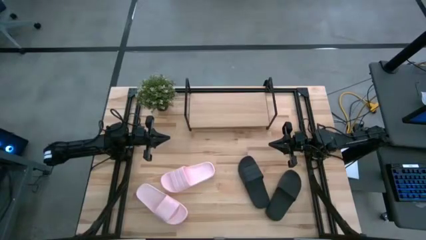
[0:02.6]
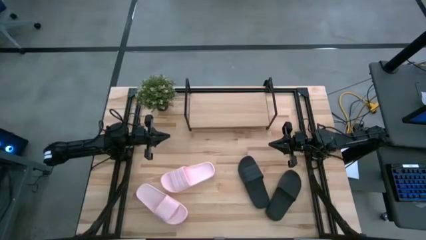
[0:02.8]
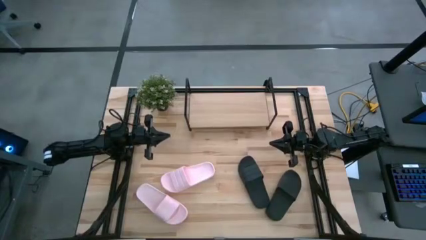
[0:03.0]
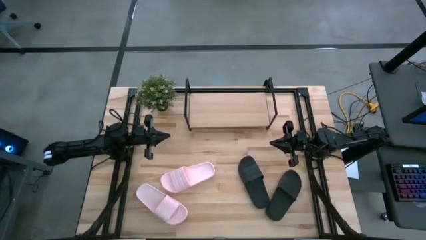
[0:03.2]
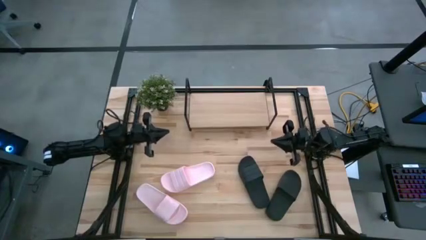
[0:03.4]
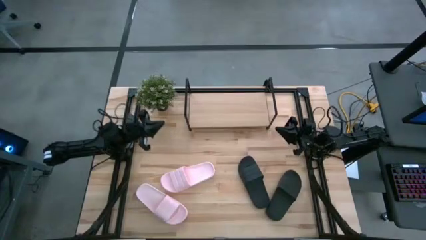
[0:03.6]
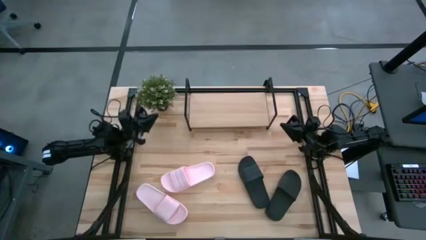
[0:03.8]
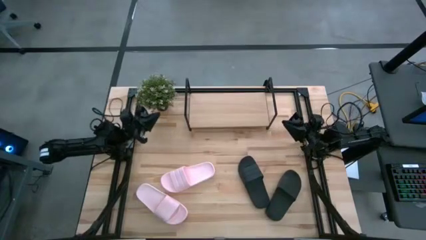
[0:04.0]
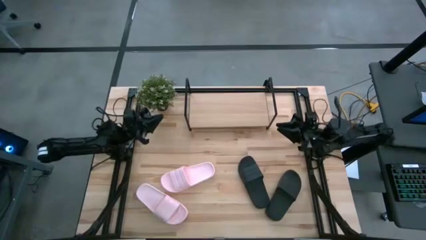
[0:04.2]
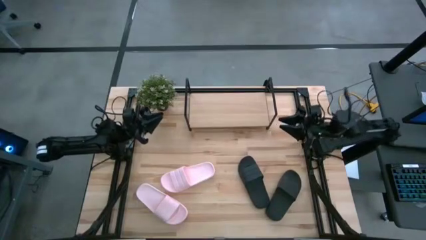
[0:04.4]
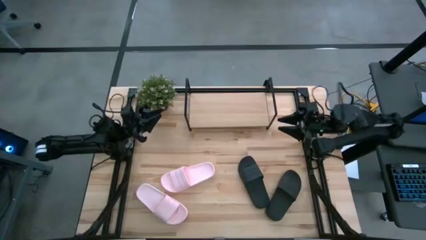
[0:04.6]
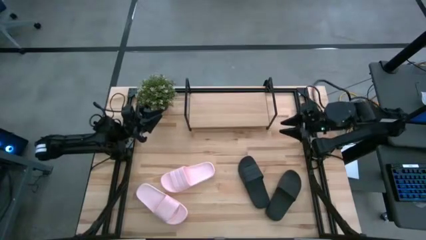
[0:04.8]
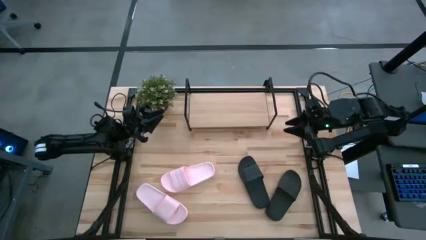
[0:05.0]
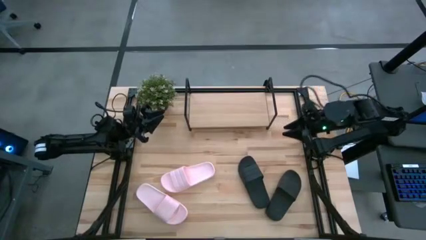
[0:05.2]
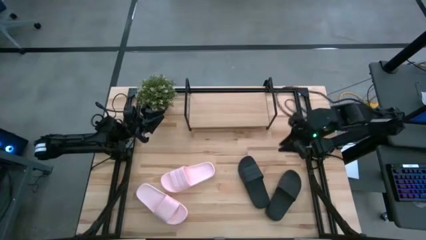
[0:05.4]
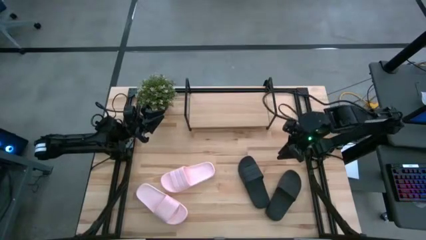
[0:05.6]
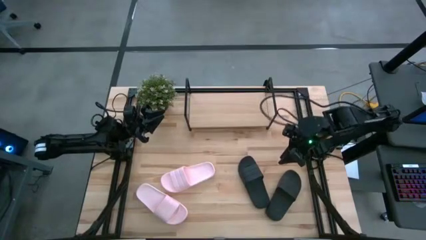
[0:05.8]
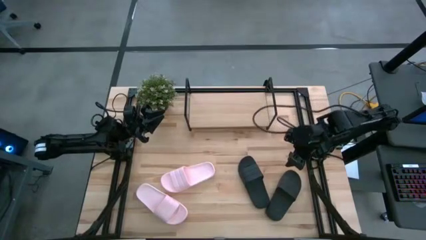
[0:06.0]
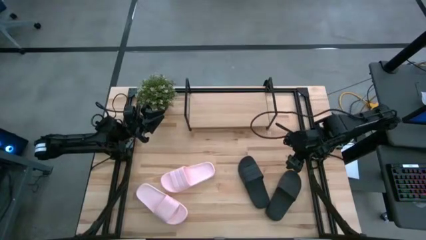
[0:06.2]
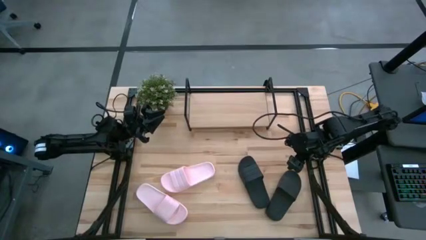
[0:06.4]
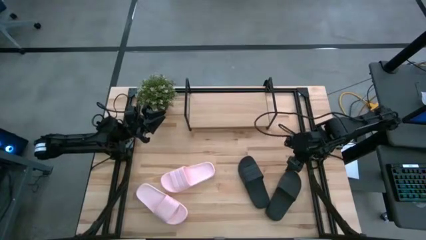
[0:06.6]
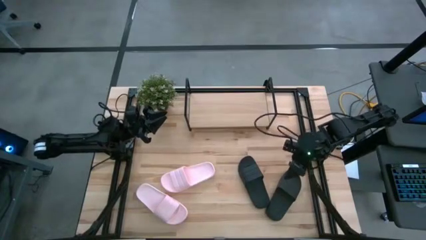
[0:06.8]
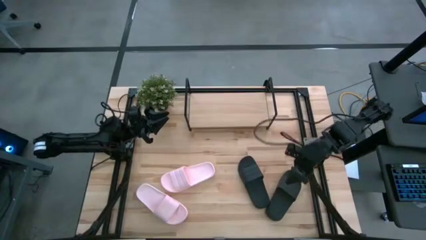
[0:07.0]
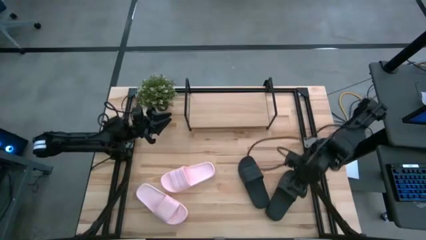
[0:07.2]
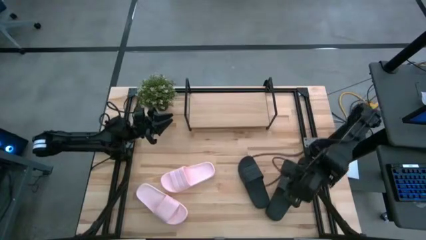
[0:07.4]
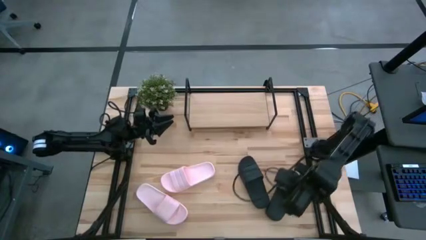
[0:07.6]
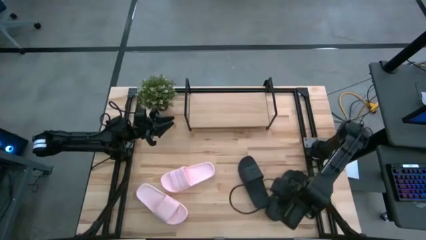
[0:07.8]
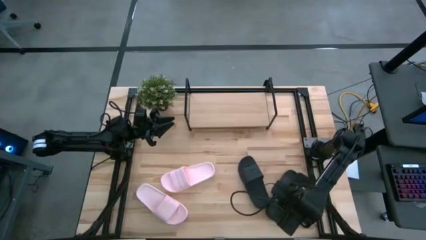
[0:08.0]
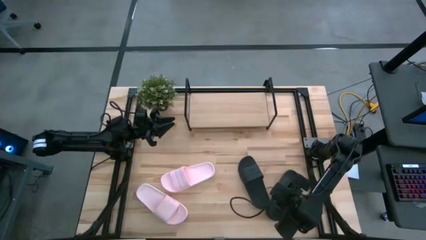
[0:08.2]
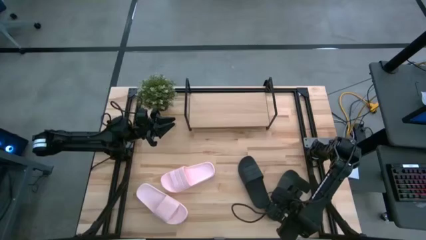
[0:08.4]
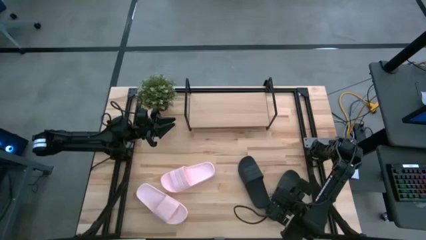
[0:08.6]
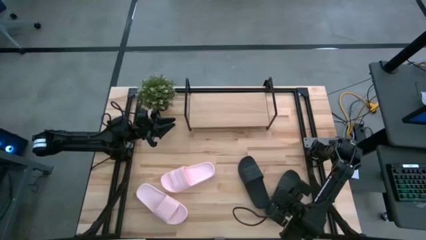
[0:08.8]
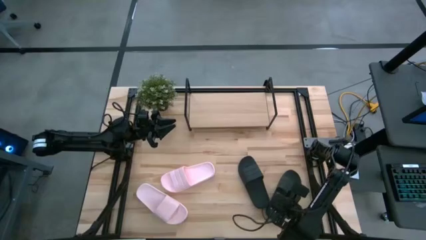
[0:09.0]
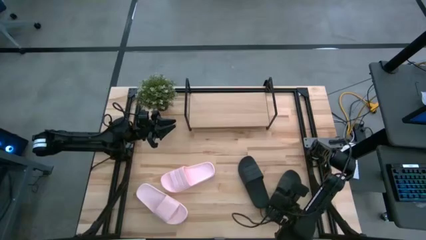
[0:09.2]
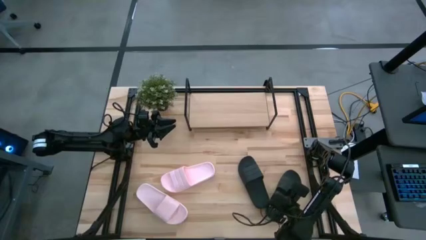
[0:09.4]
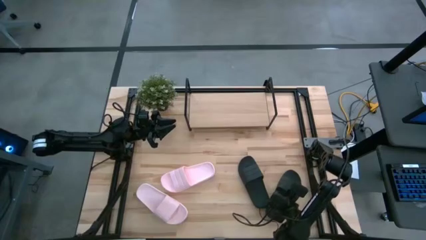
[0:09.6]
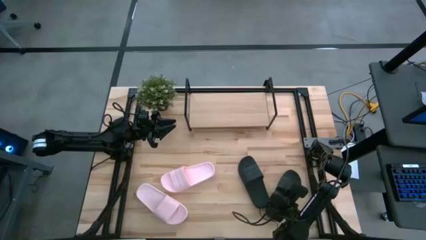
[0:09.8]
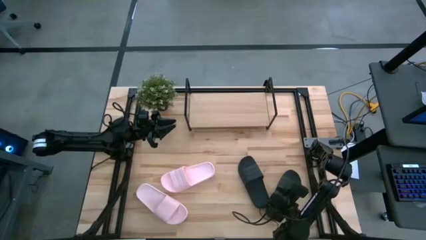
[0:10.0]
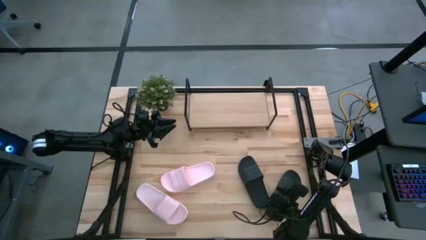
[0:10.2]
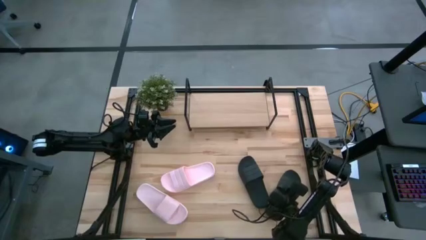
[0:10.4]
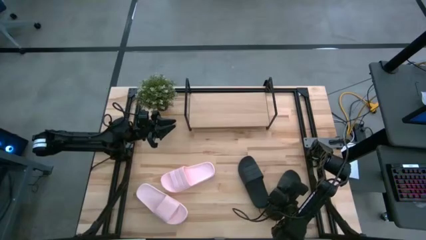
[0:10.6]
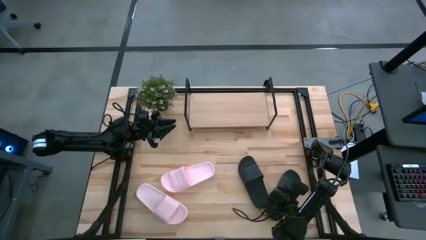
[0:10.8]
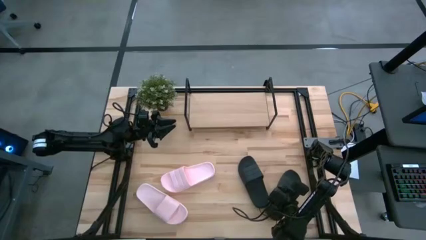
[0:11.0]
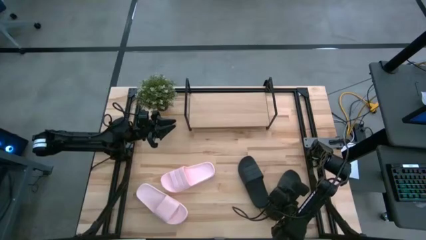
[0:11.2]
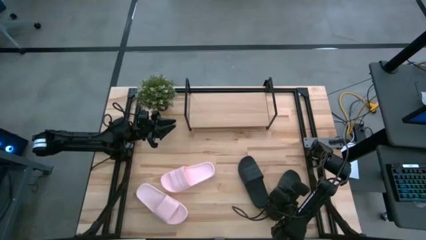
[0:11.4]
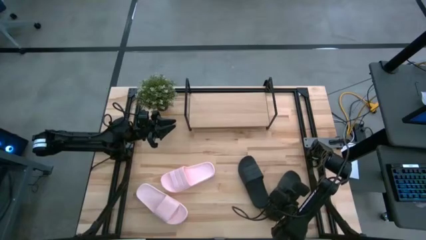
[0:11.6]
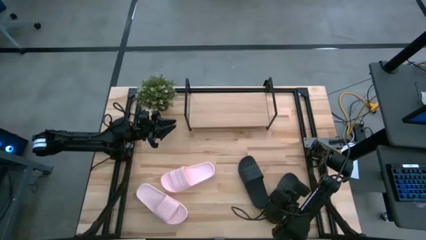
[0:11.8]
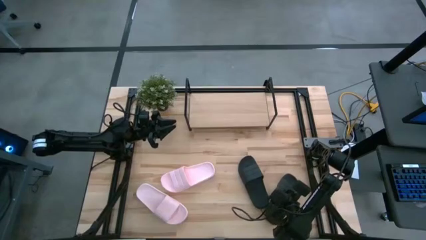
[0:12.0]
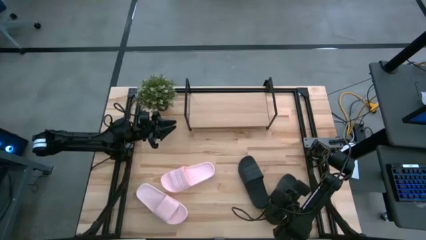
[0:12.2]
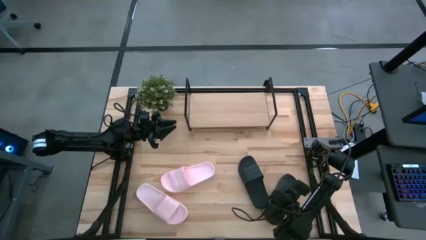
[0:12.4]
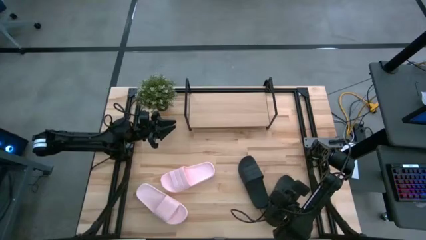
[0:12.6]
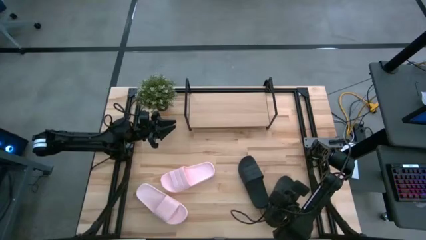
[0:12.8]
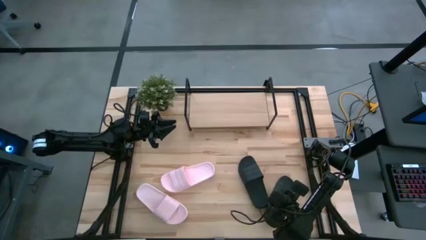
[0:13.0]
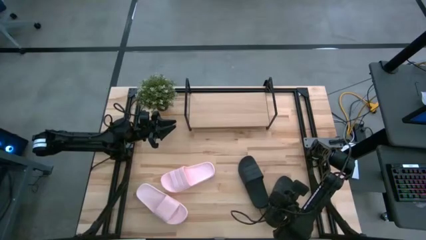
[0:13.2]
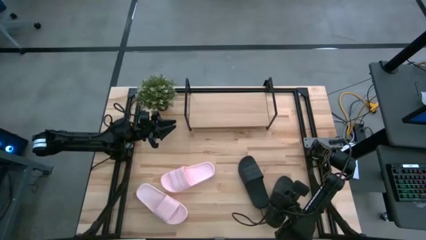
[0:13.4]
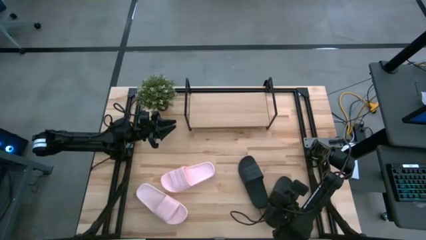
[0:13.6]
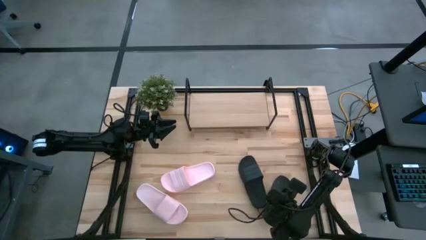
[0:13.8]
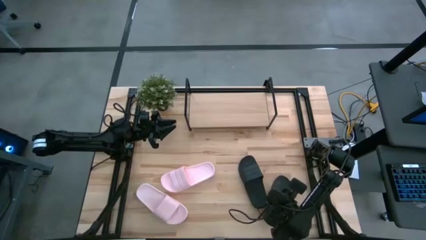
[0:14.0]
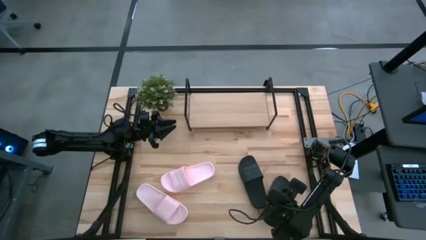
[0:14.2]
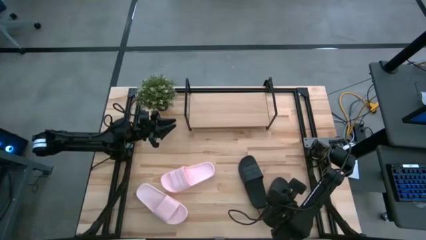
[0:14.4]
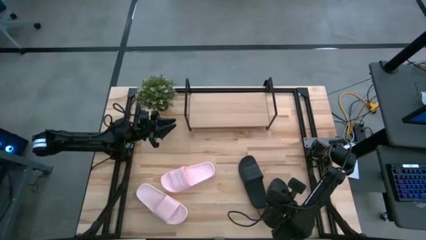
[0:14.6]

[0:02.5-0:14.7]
Task: Pick and place slides into the shelf
Put the right black slipper on the shelf
